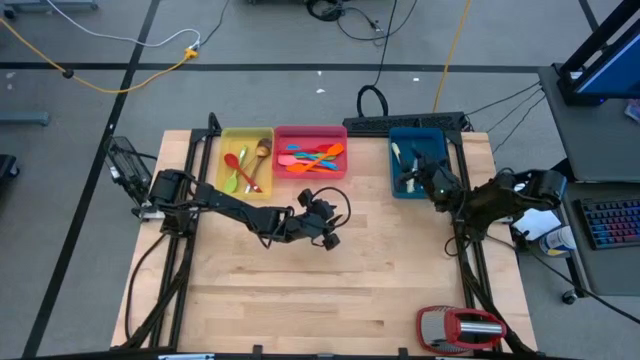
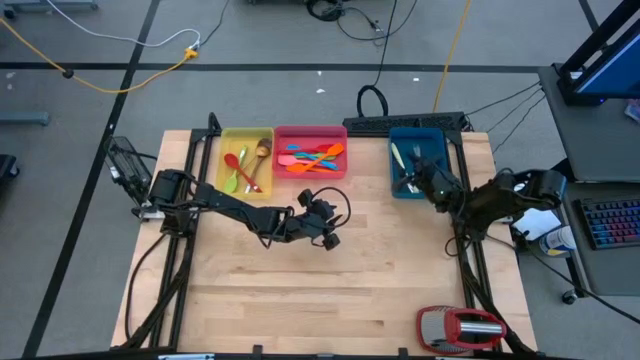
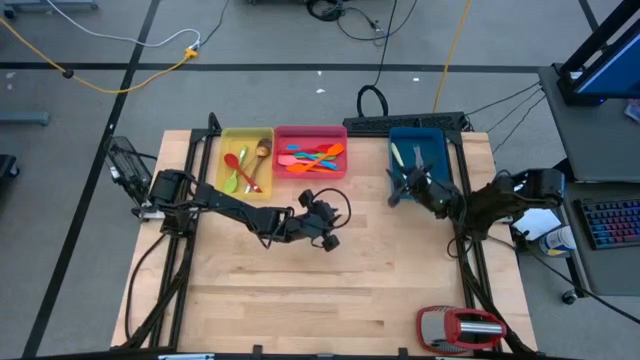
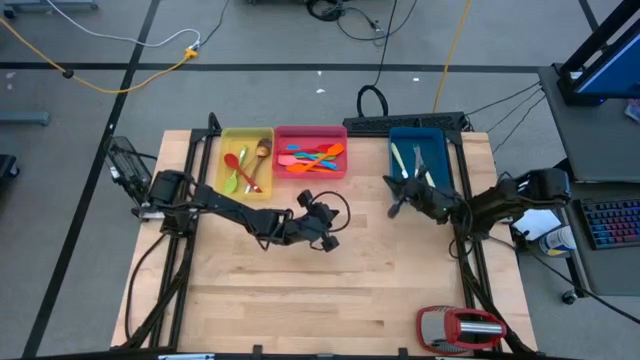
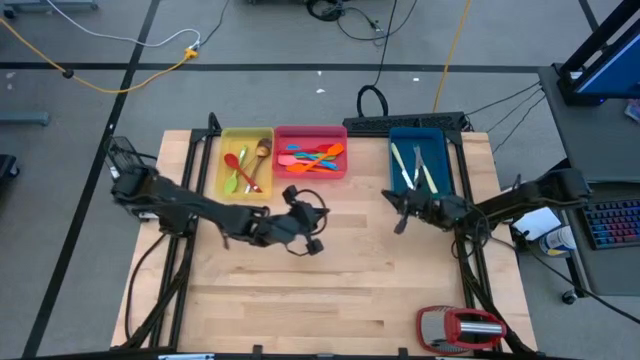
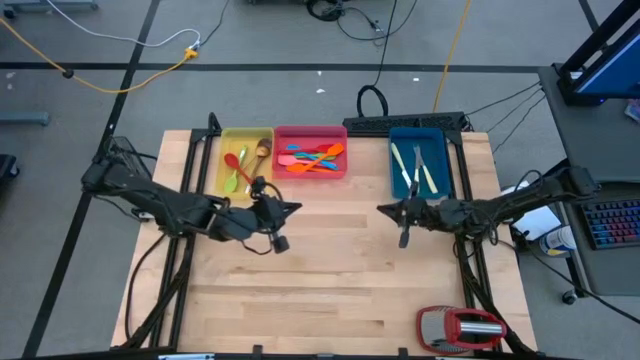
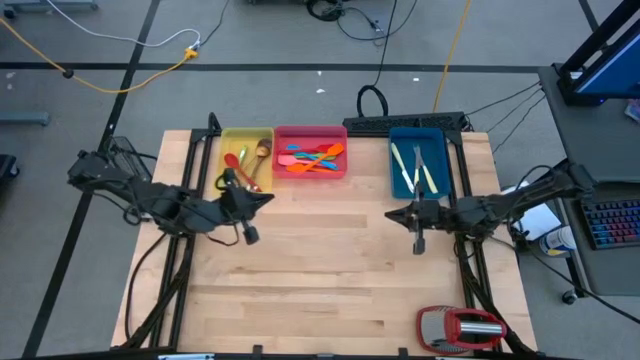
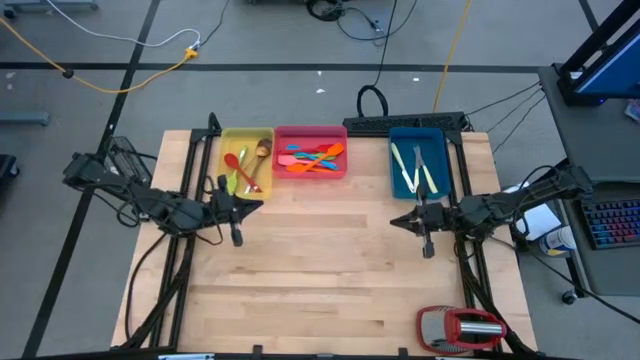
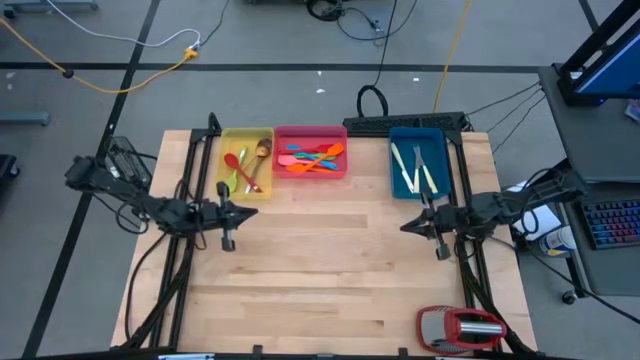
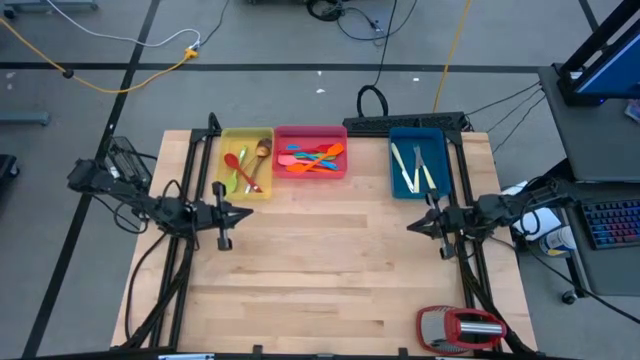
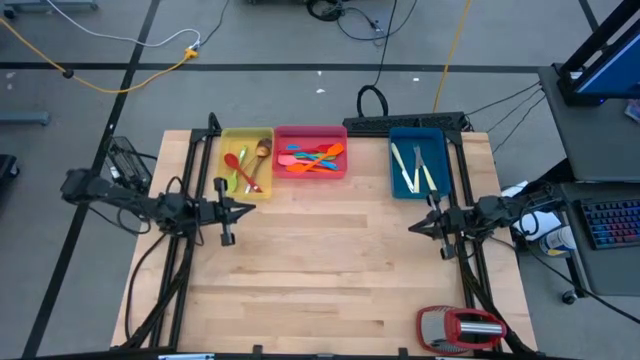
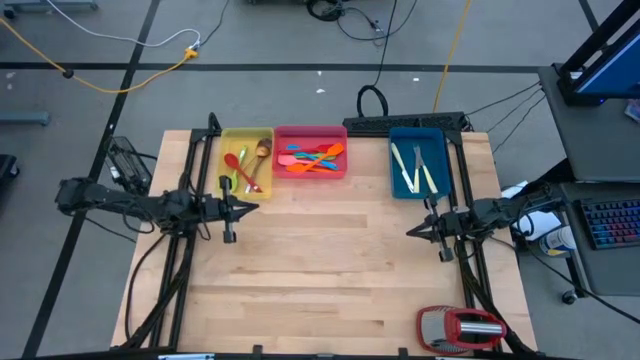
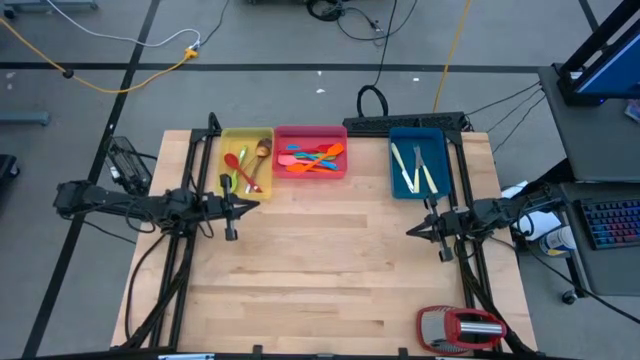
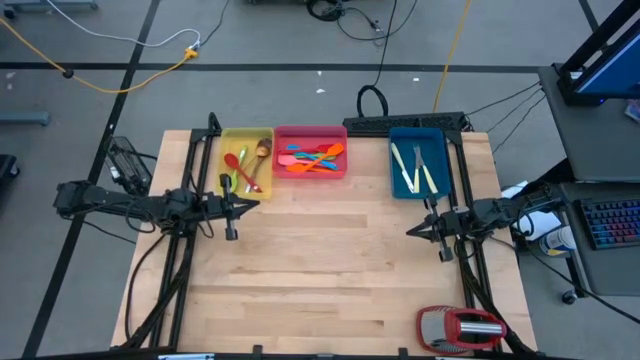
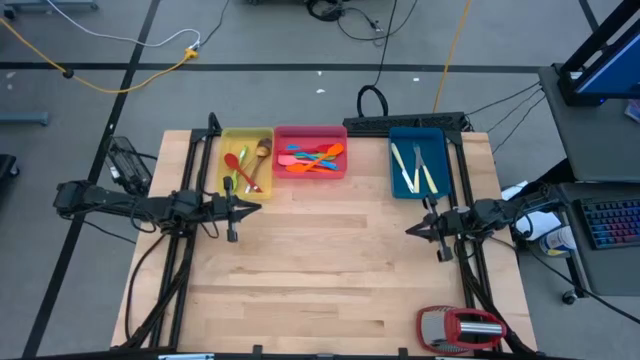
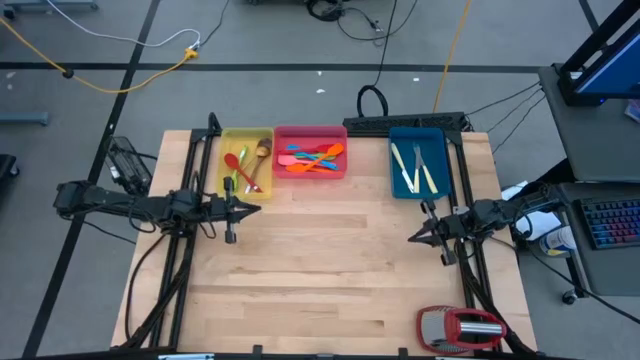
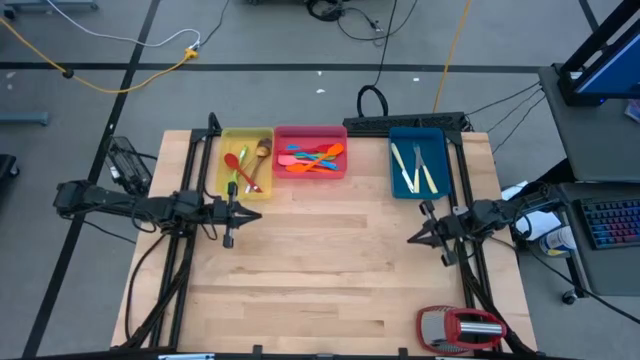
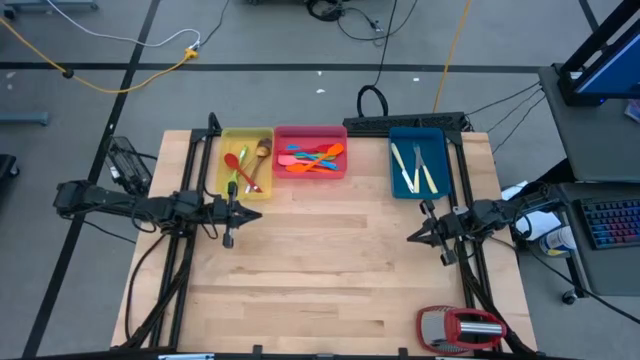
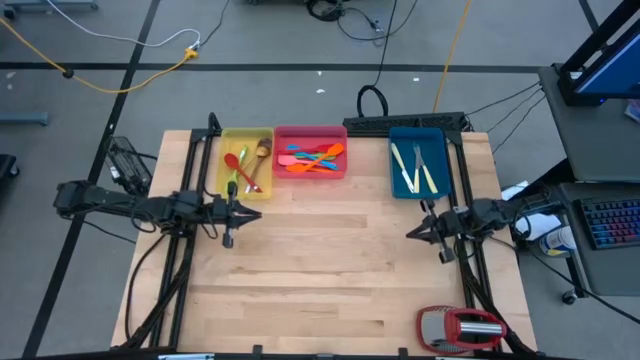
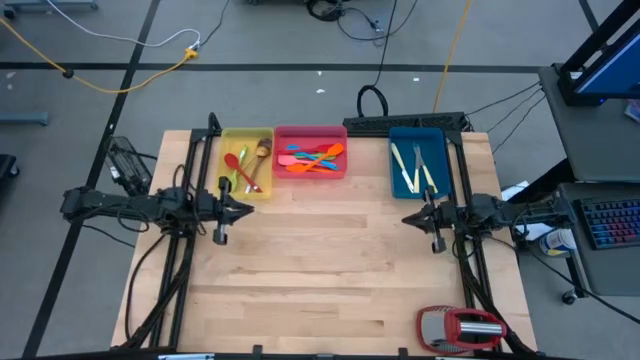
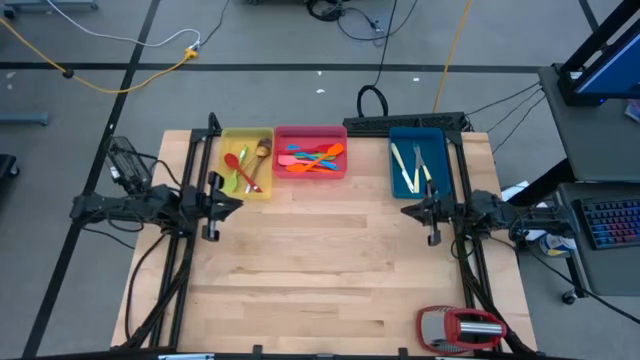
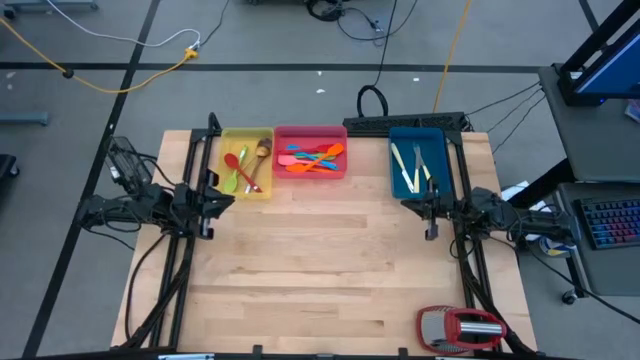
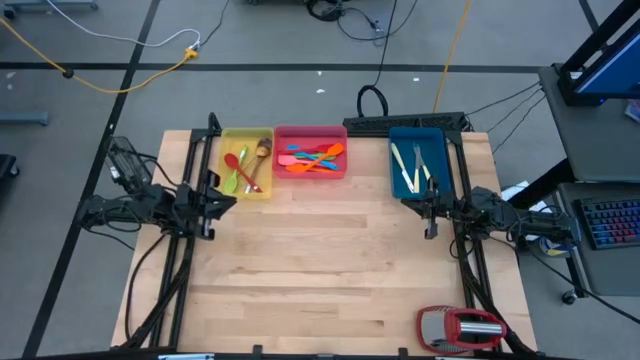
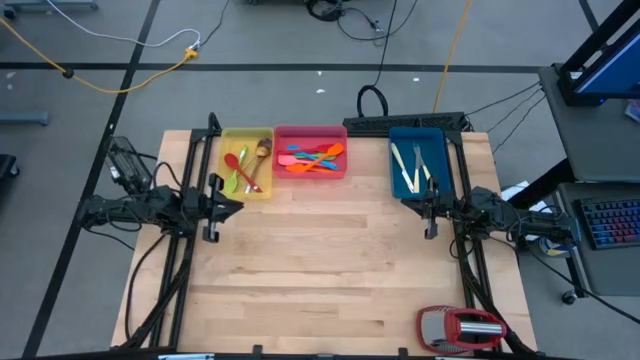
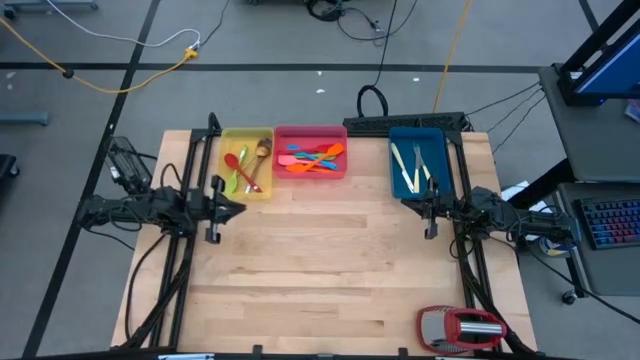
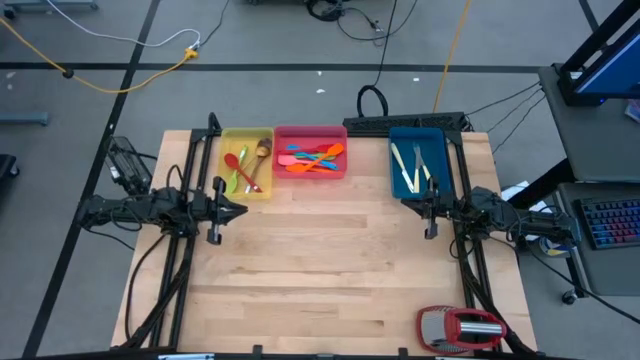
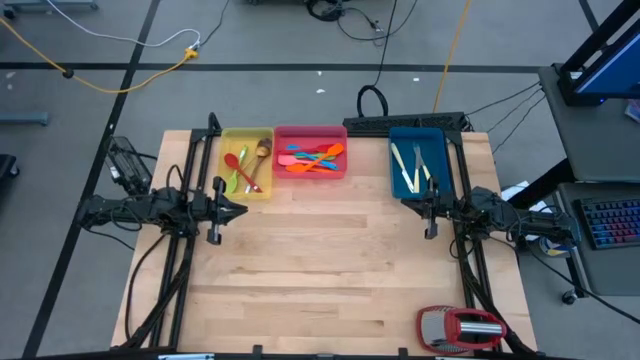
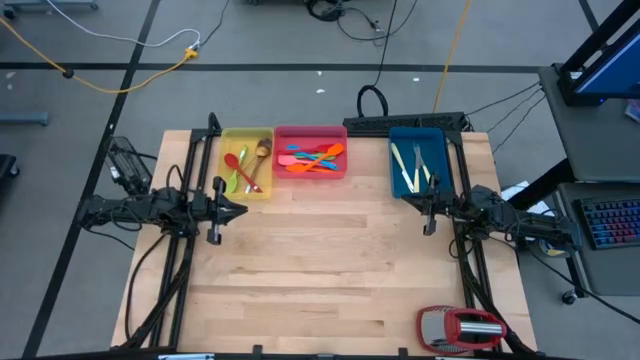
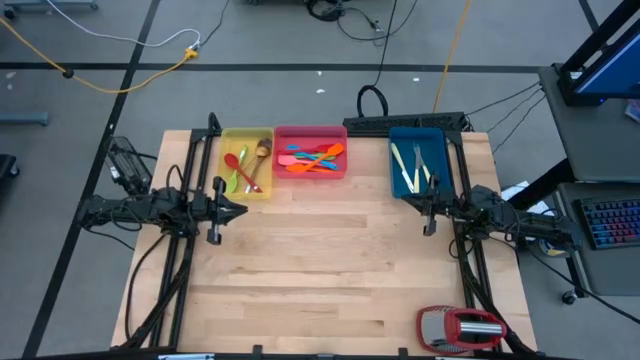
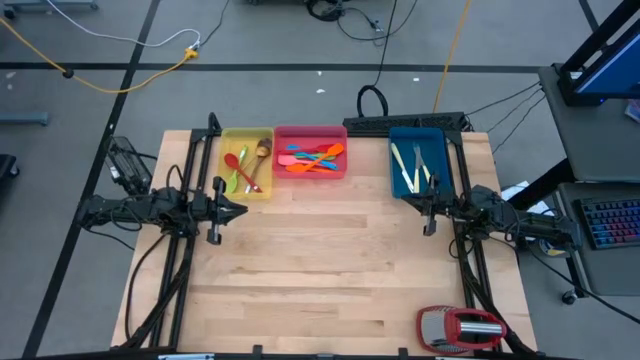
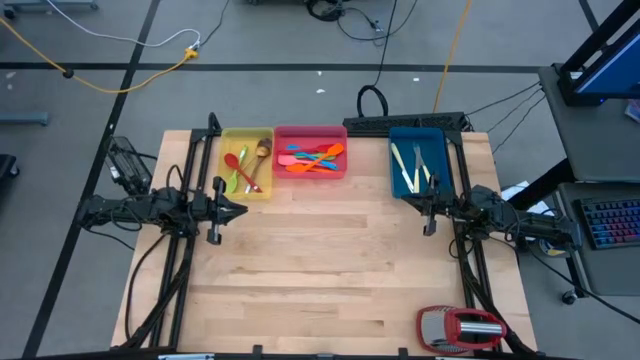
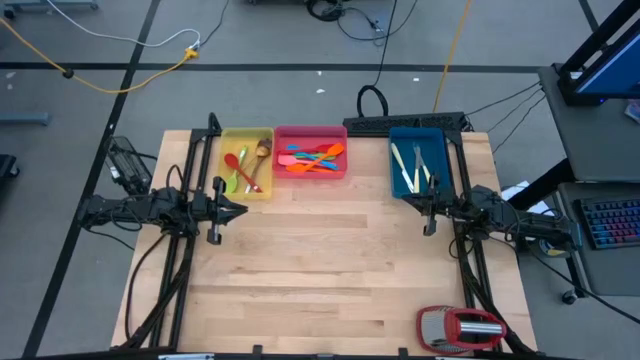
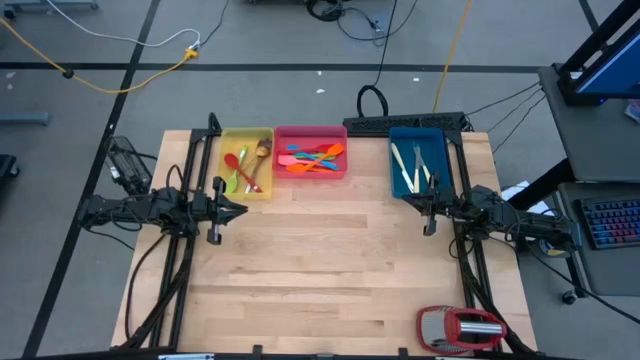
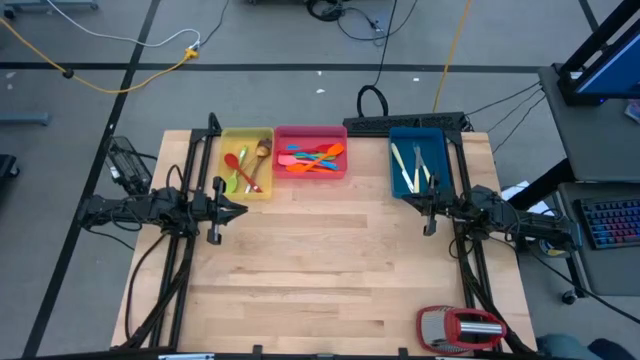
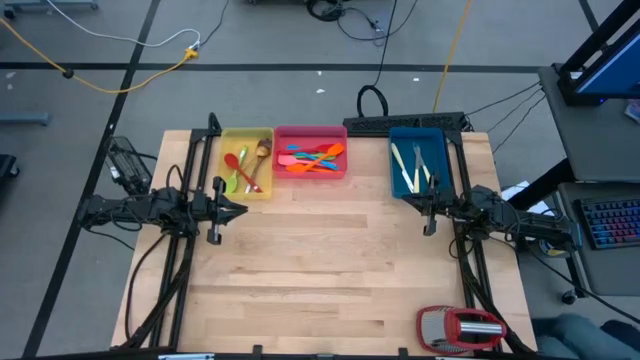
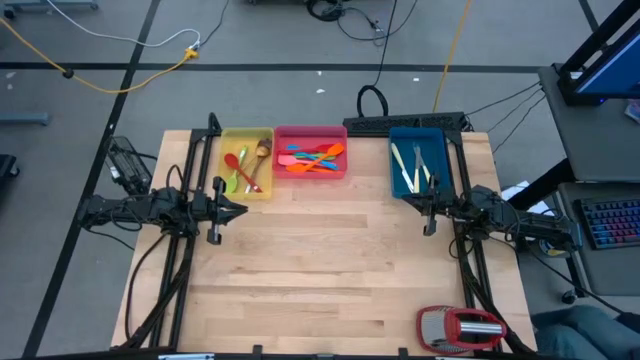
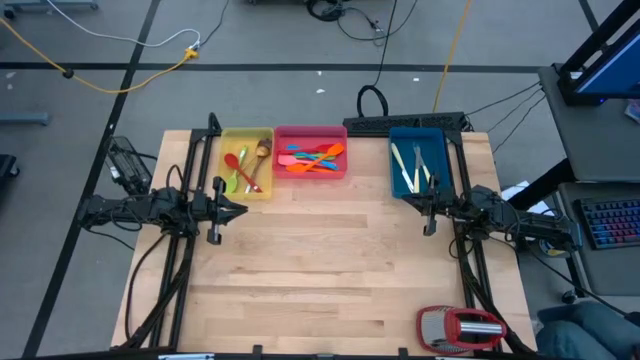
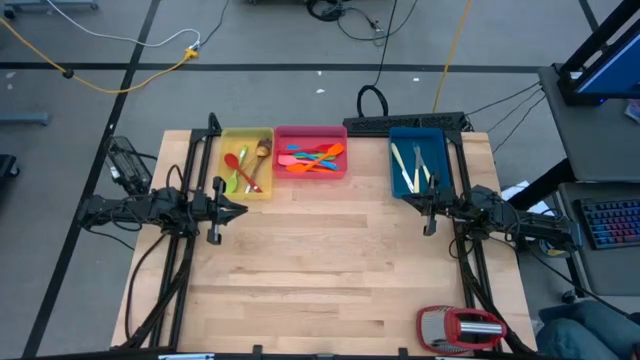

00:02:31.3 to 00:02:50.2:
Task: Pick & Place Kitchen Items
Return to Home Position

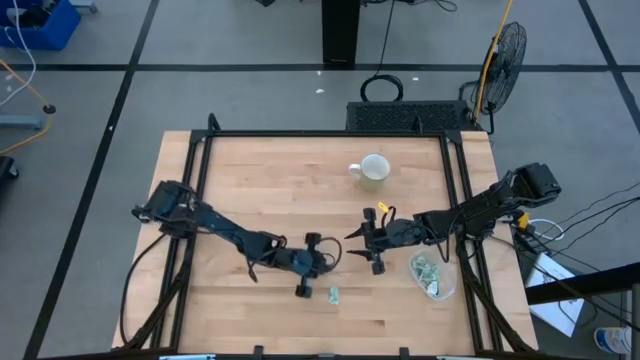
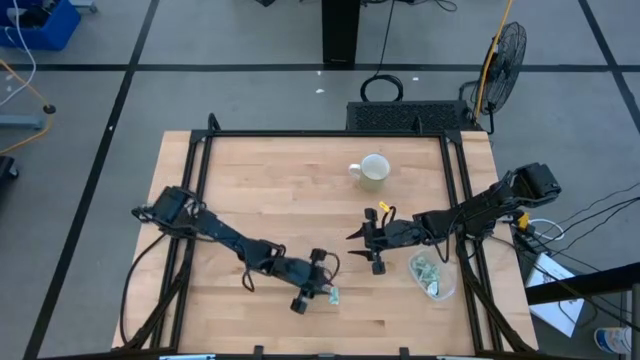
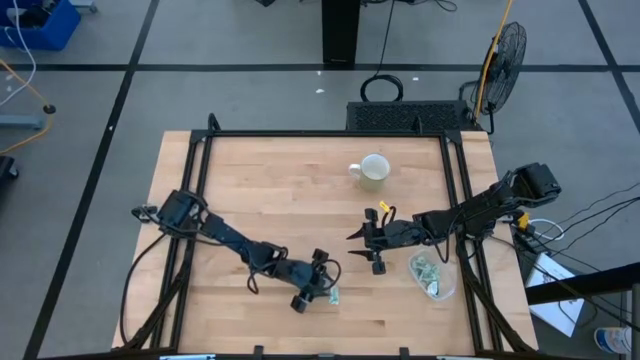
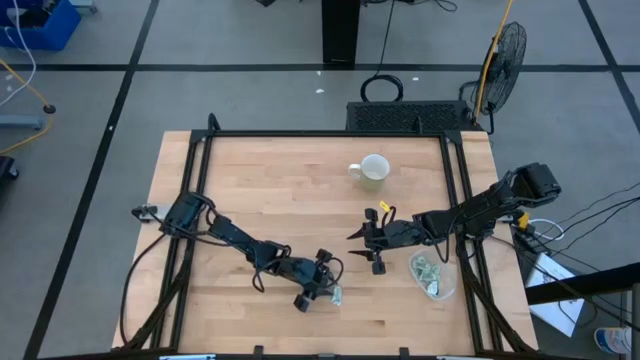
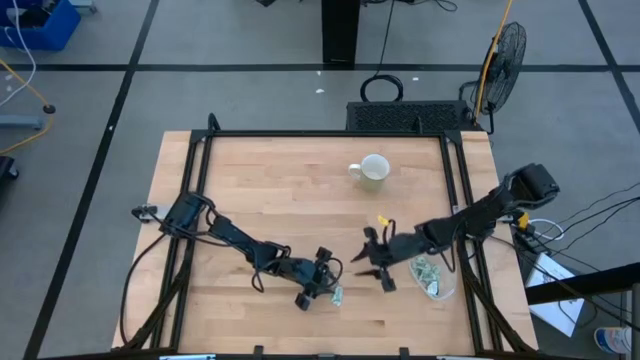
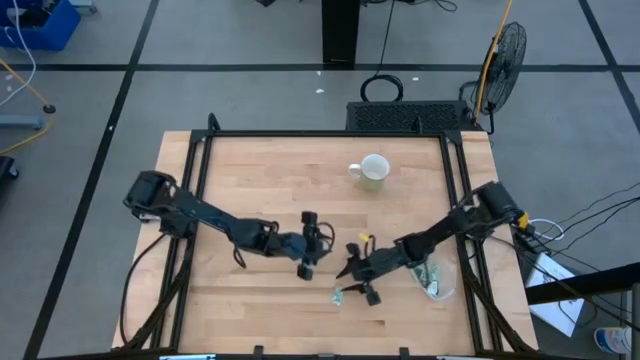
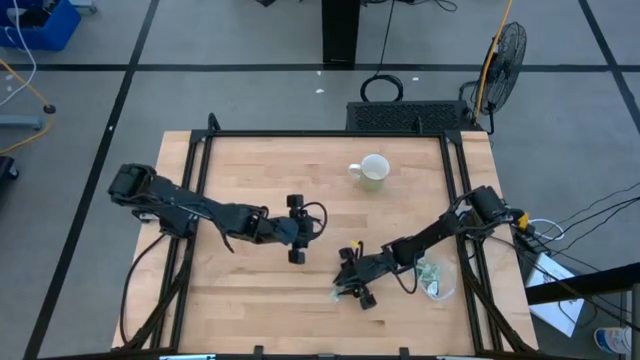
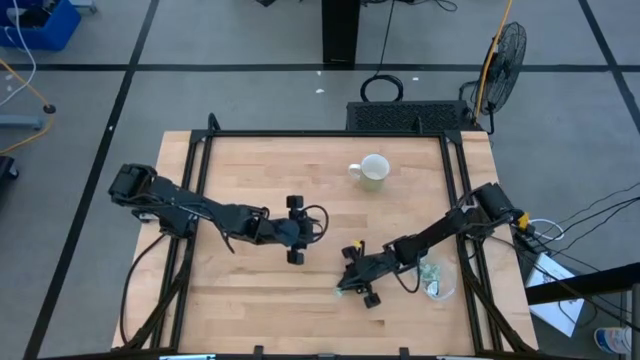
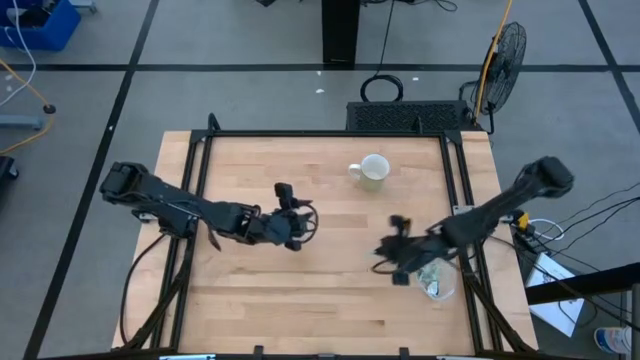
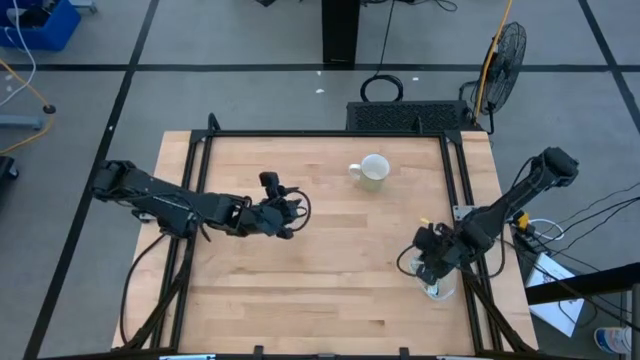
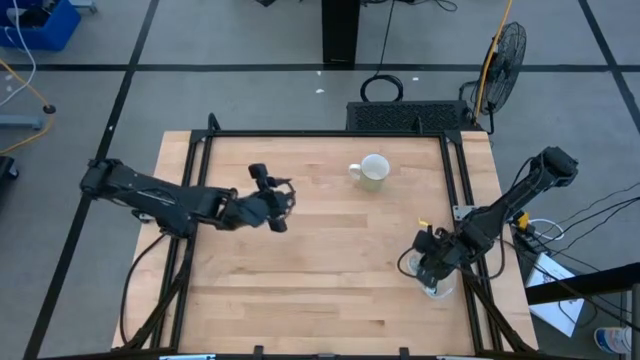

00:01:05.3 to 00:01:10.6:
Task: Pick and place Stevia / Truvia into bins
Put the stevia packet into the transparent bin
